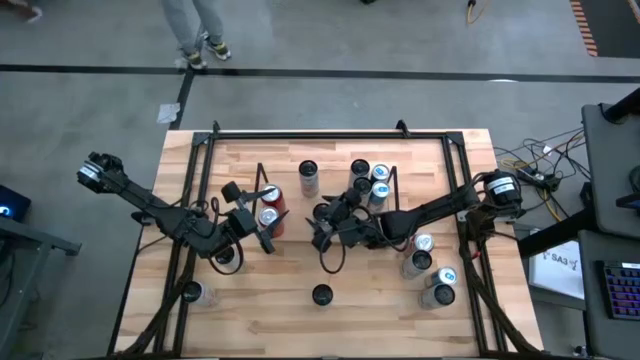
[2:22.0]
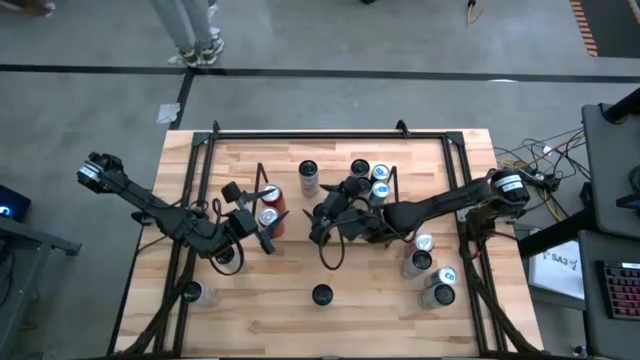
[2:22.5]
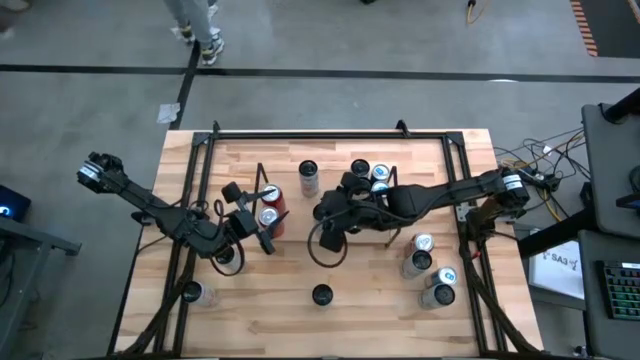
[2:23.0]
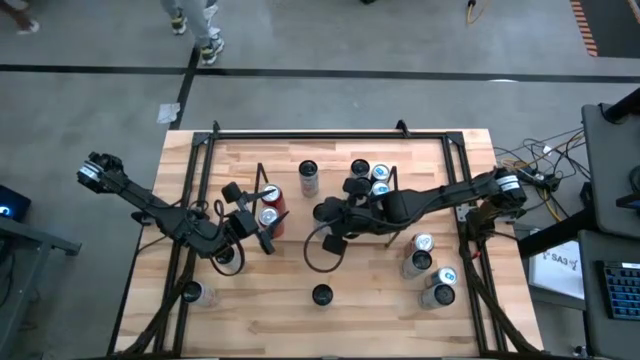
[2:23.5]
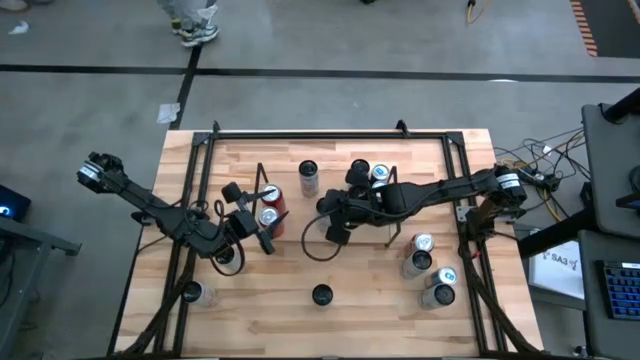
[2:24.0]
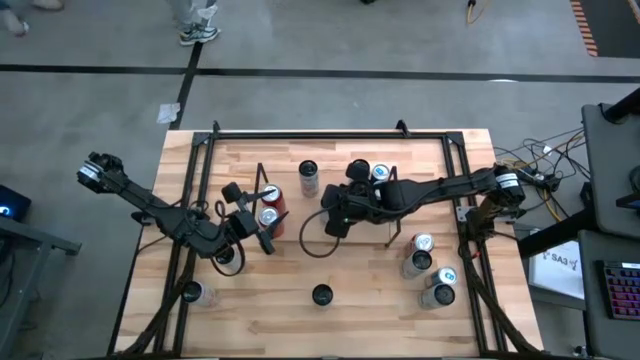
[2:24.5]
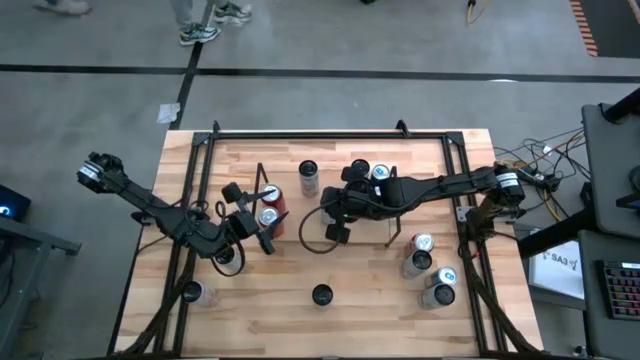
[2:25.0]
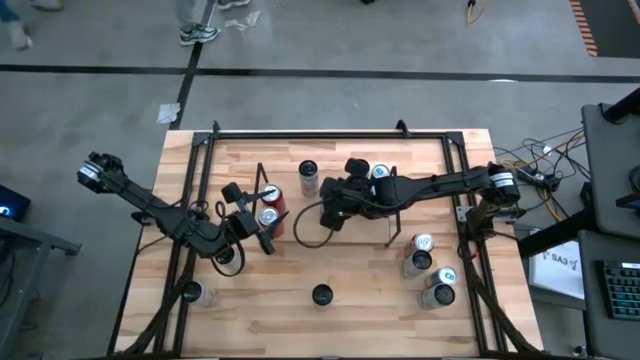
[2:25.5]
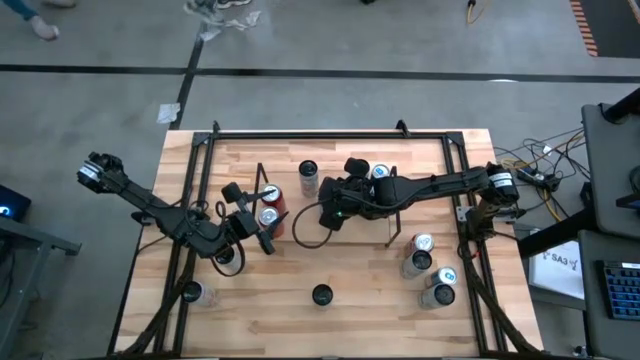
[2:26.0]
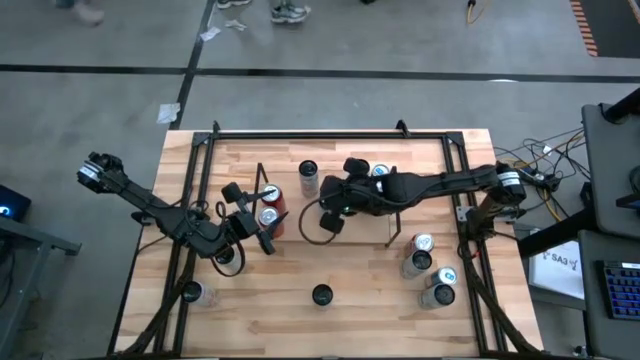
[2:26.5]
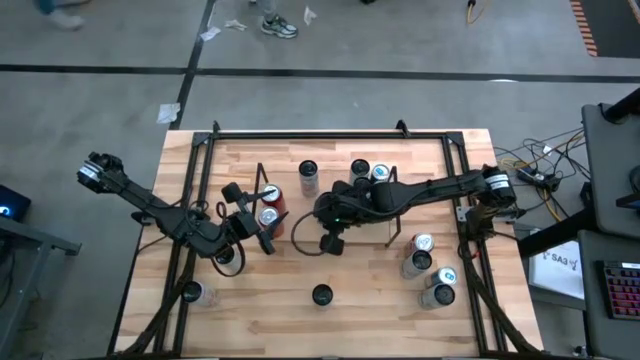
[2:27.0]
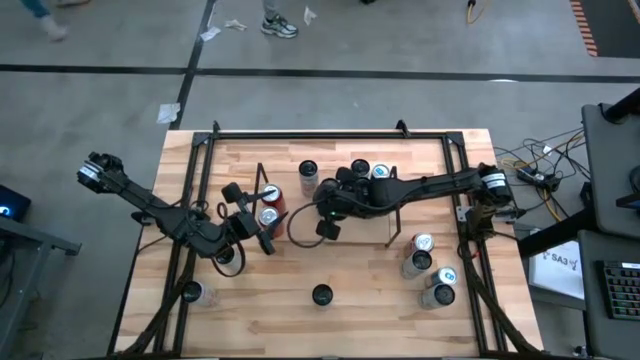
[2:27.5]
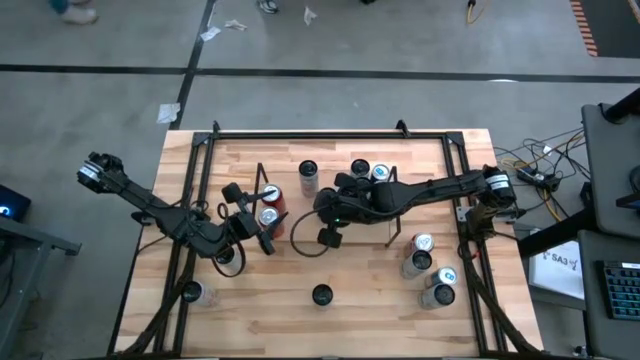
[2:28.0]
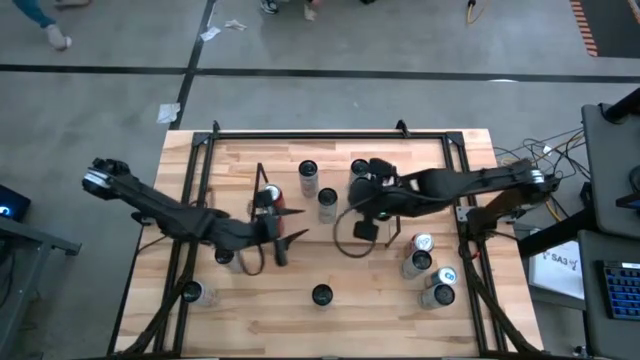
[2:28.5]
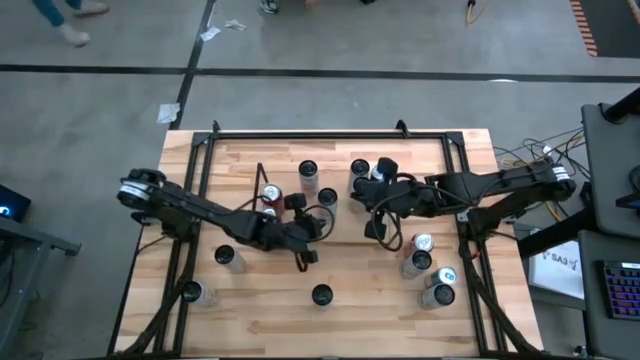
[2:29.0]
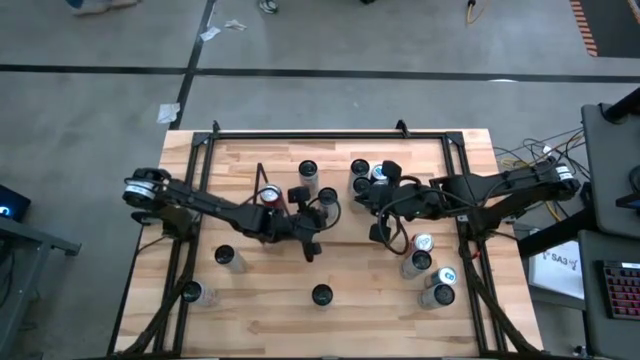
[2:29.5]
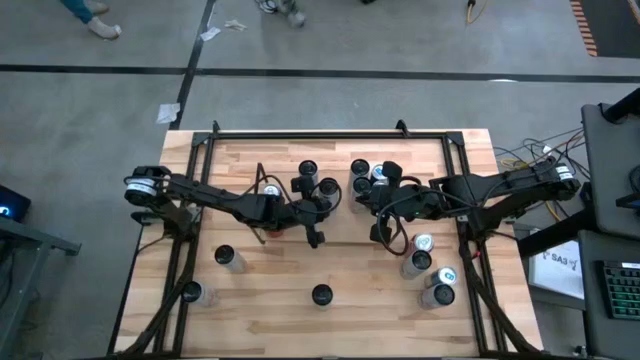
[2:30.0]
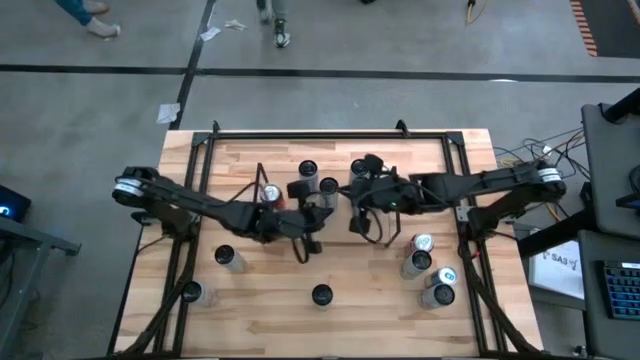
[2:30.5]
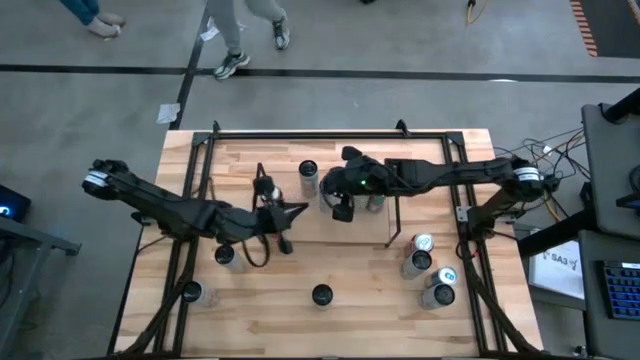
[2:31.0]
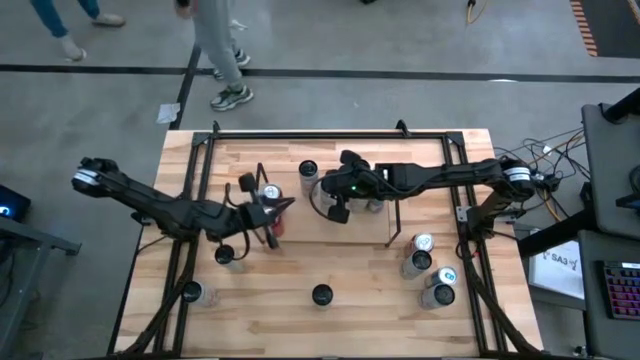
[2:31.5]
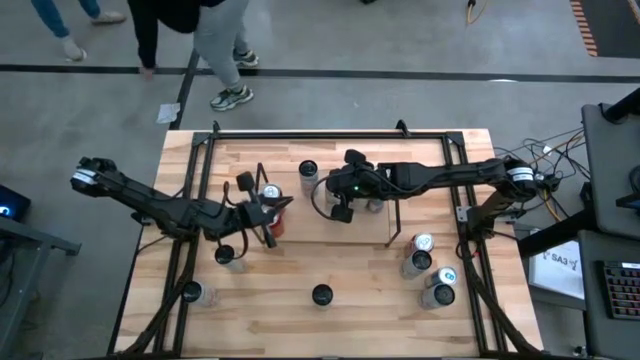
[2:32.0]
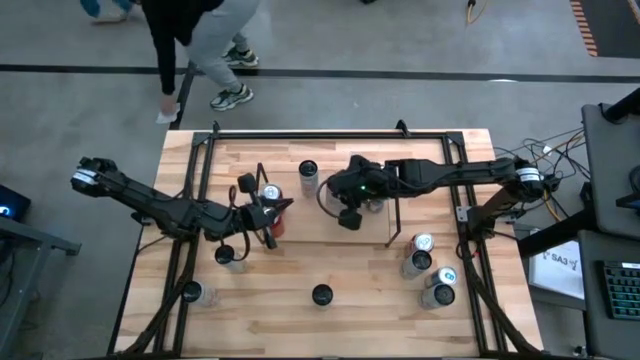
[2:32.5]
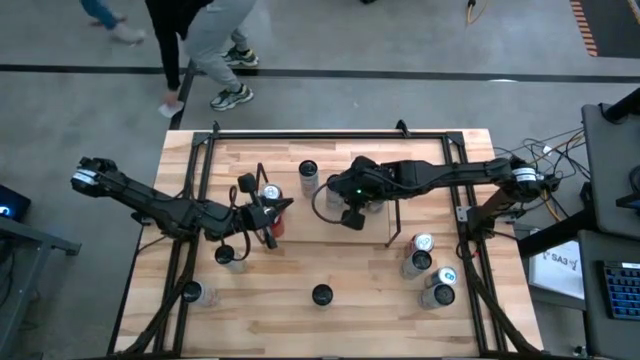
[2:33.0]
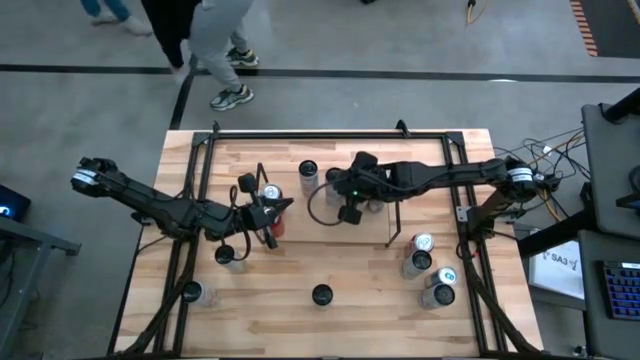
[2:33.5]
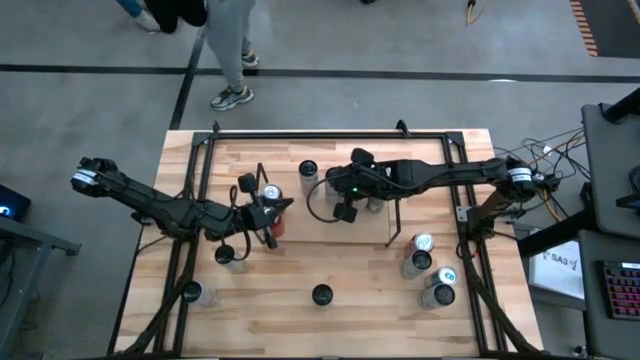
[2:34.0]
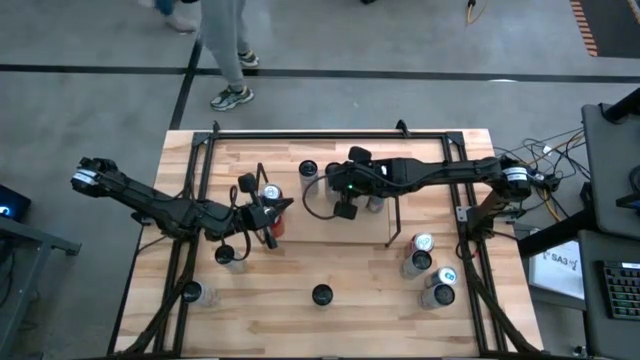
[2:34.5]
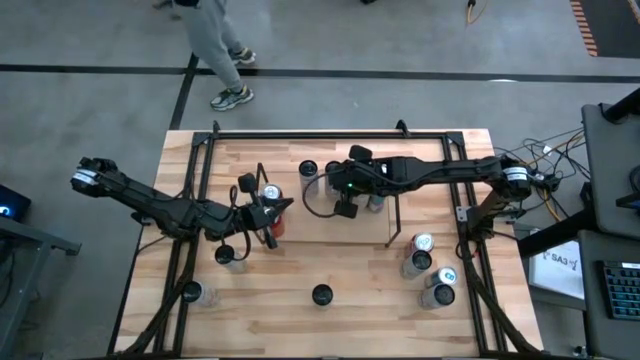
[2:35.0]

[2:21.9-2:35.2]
Task: Place canned beverage on shelf
Put the bottom left white and blue soda can on the shelf

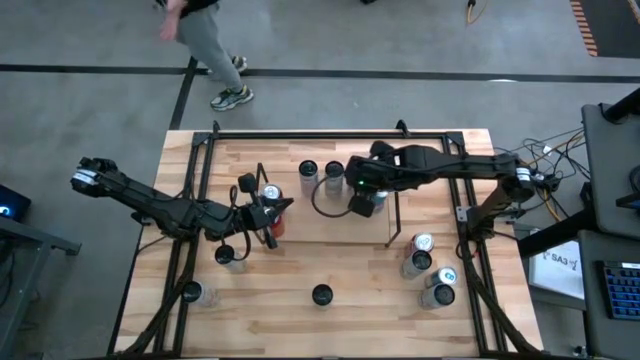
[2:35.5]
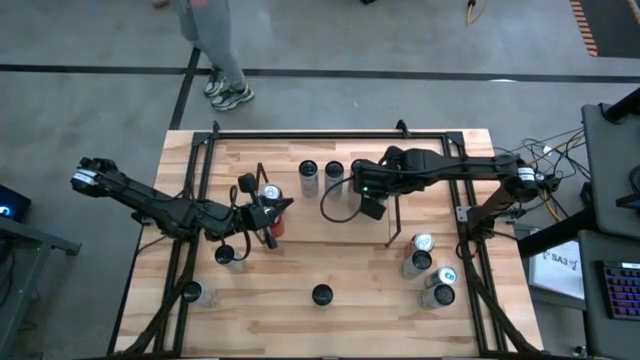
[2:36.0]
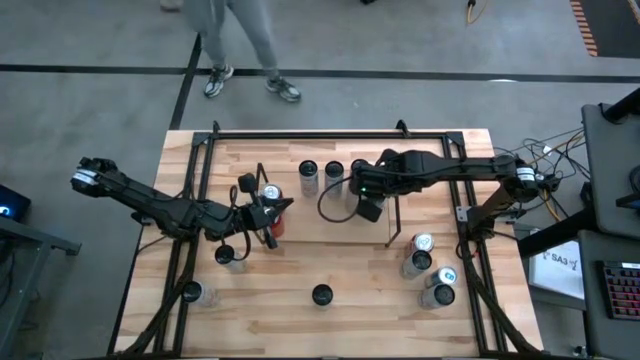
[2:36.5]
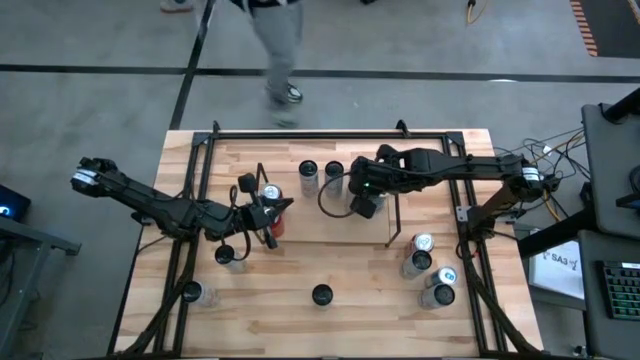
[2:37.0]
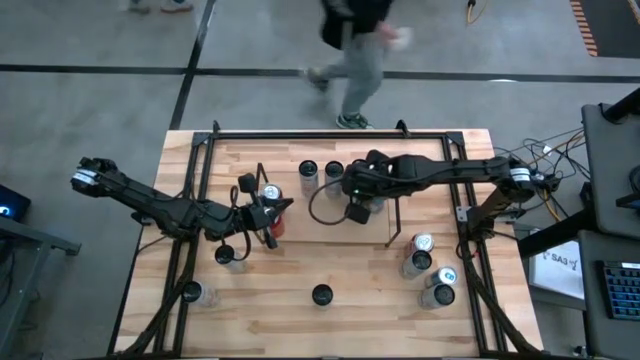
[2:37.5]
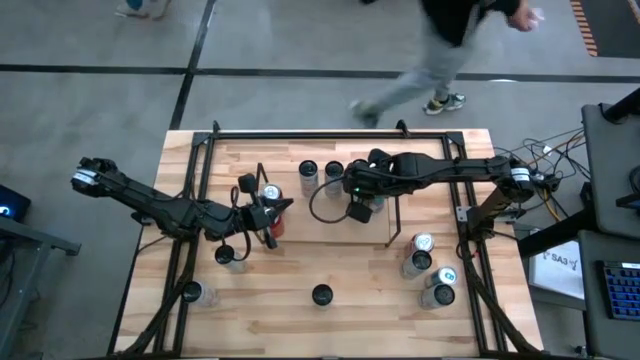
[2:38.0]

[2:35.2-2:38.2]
Adjust the white and yellow soda can

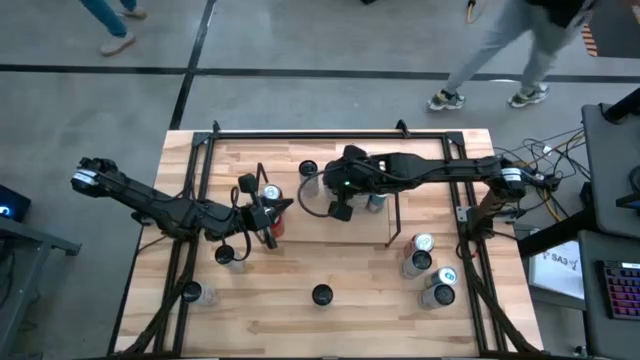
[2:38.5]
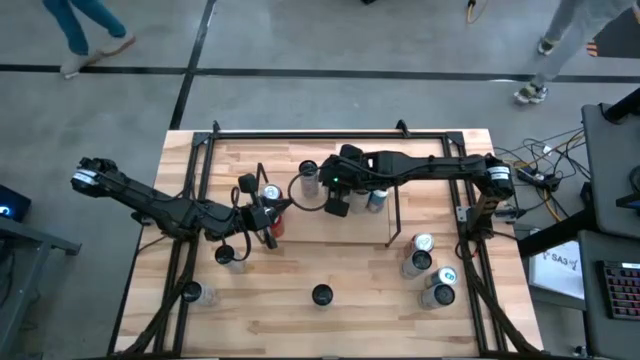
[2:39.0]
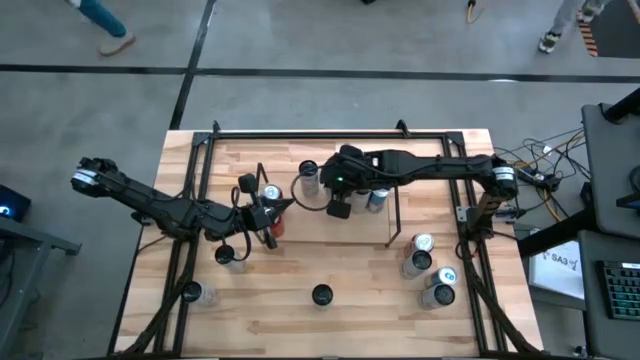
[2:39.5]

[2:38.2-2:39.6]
Adjust the white and blue soda can

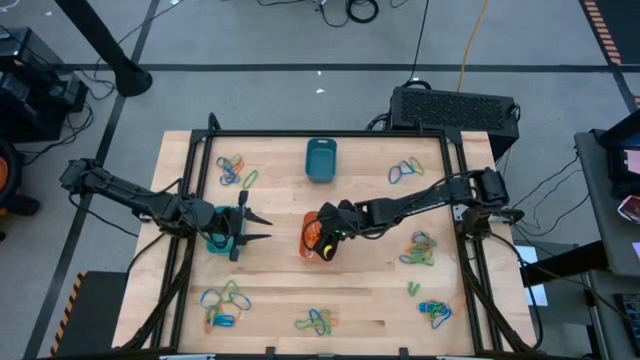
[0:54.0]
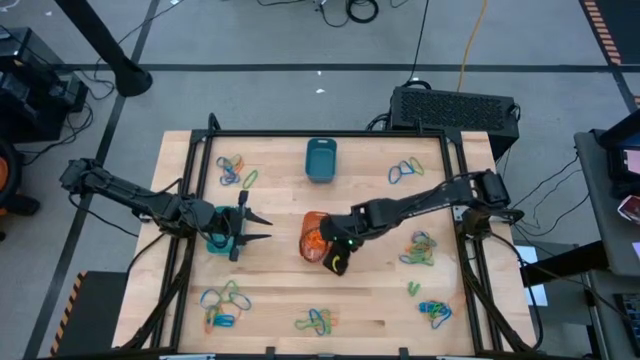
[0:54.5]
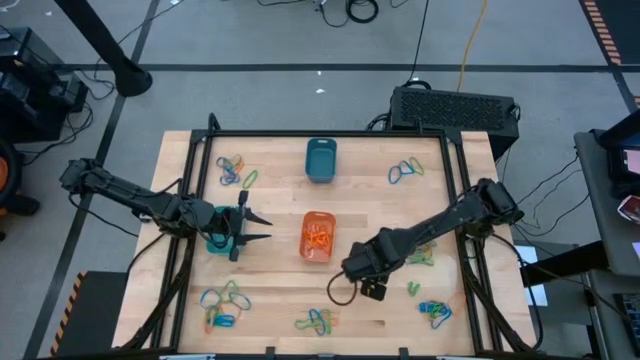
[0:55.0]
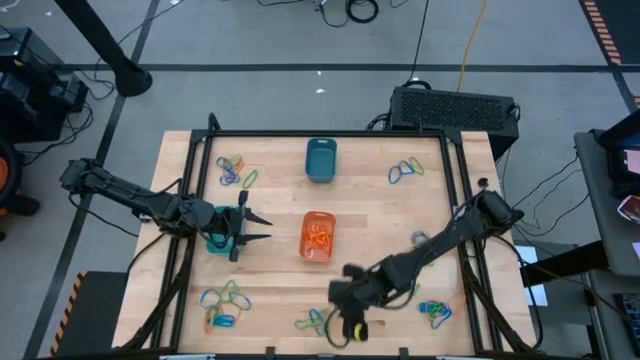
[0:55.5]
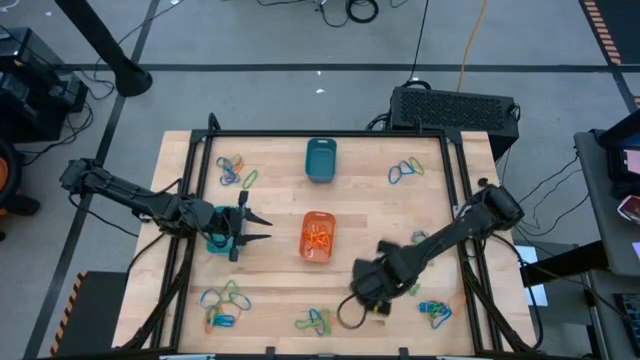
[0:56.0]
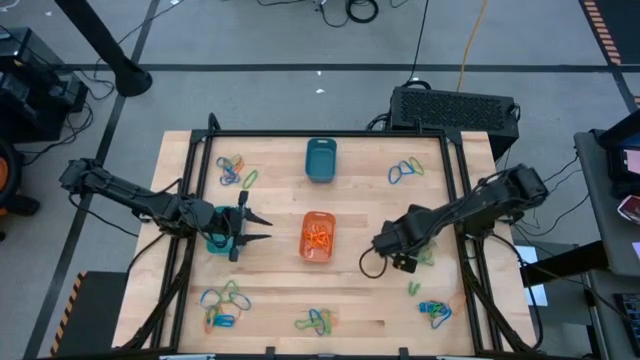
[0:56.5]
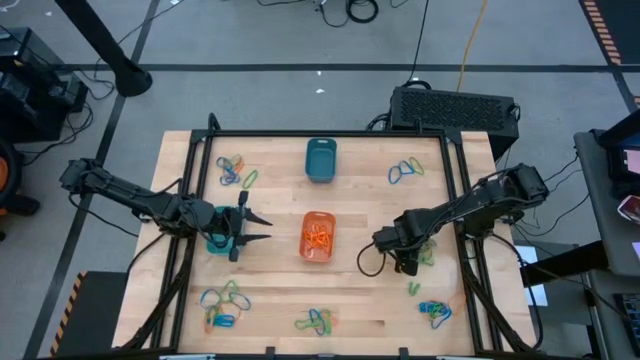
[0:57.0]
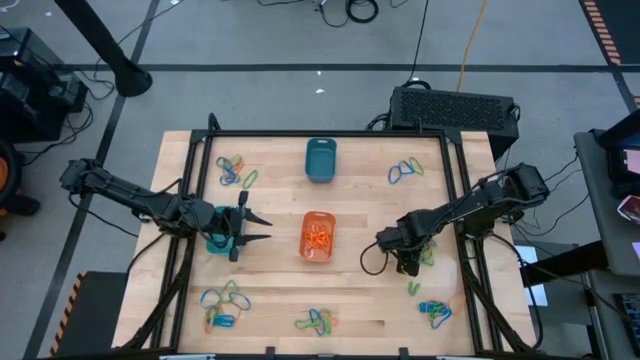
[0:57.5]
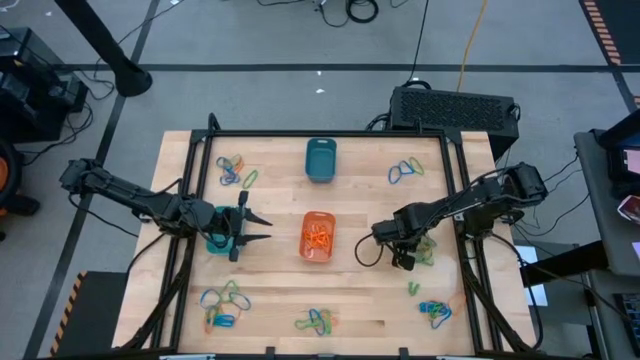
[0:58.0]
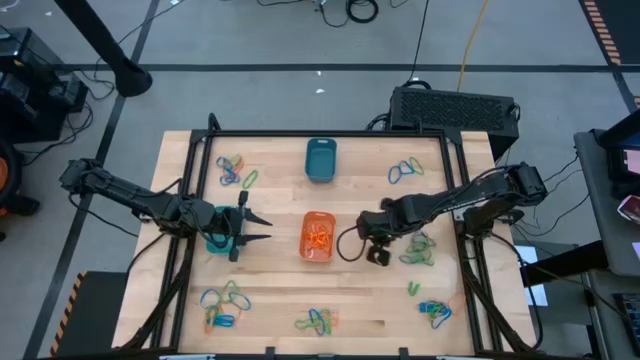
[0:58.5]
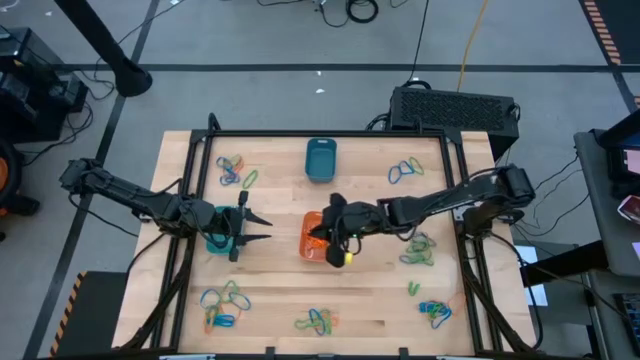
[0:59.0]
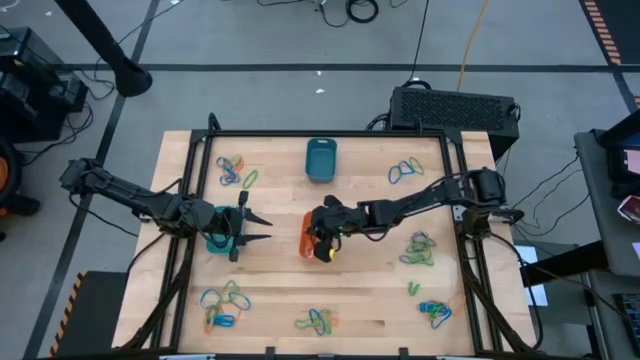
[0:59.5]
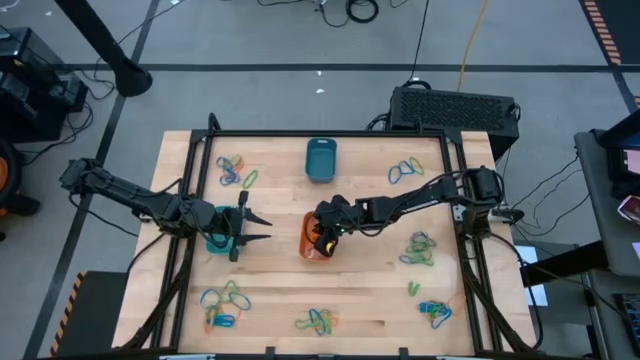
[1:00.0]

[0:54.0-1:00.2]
Task: Sort rubber bands into baskets
Put the orange rubber band into the orange bin
